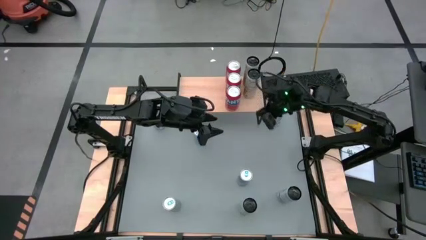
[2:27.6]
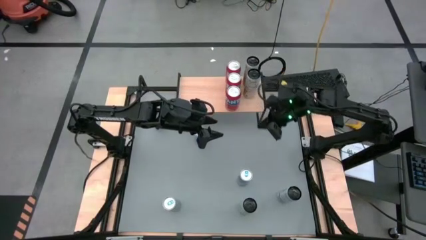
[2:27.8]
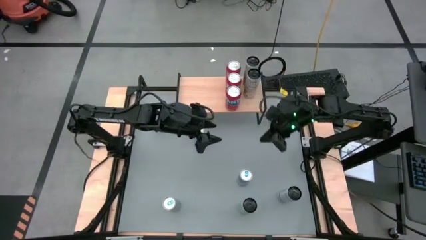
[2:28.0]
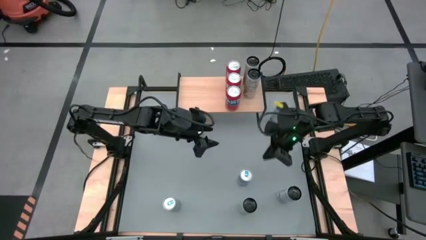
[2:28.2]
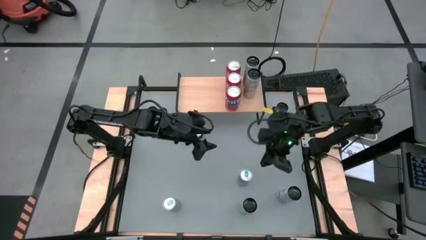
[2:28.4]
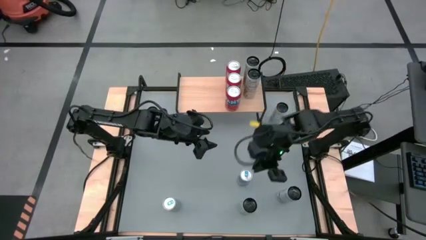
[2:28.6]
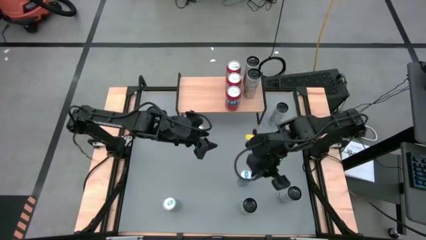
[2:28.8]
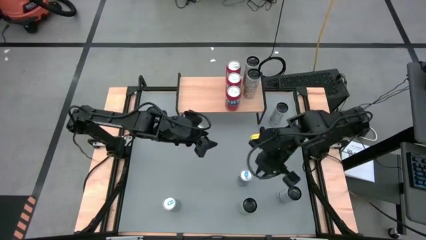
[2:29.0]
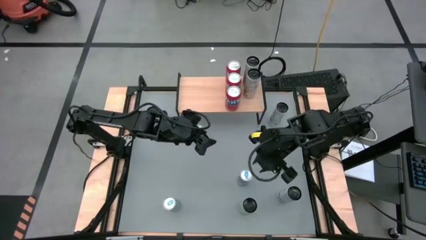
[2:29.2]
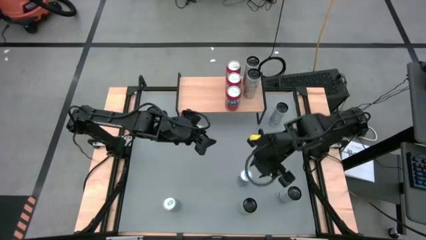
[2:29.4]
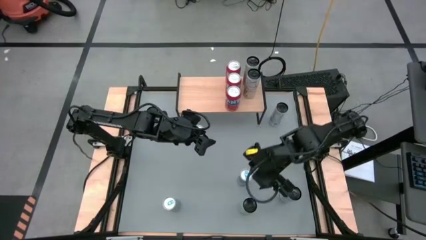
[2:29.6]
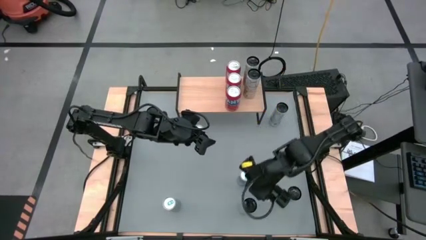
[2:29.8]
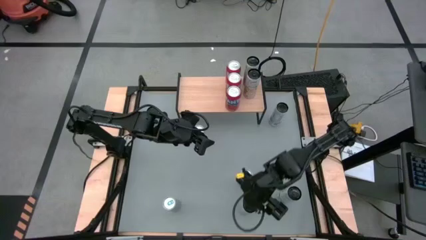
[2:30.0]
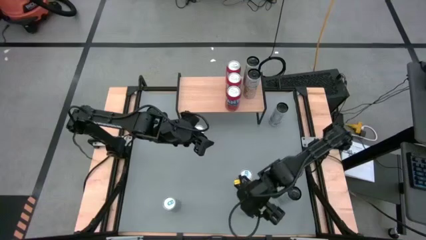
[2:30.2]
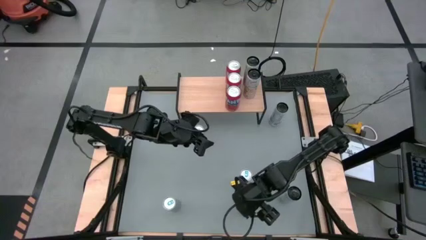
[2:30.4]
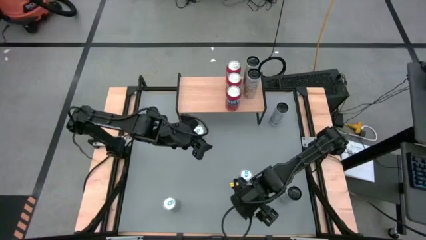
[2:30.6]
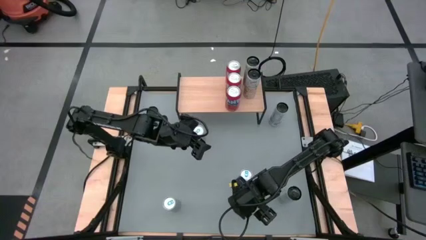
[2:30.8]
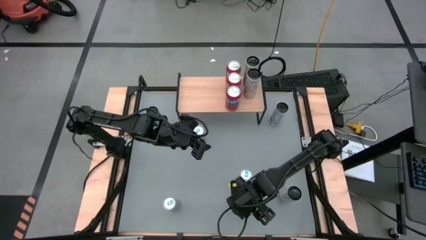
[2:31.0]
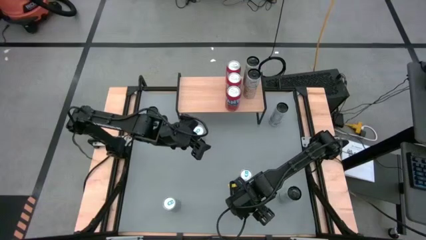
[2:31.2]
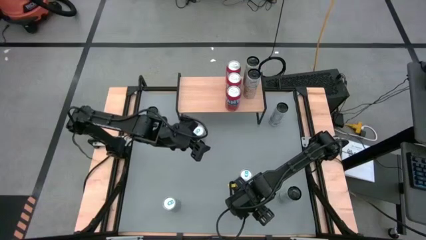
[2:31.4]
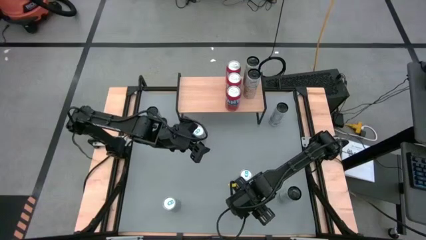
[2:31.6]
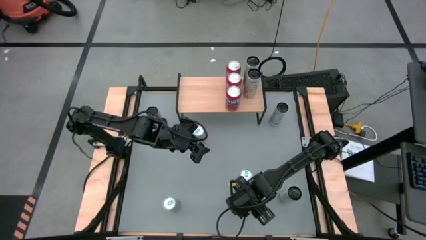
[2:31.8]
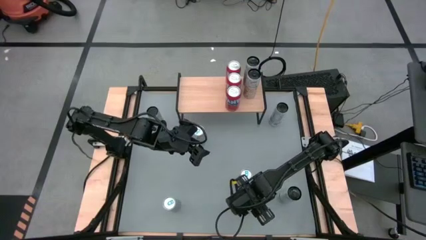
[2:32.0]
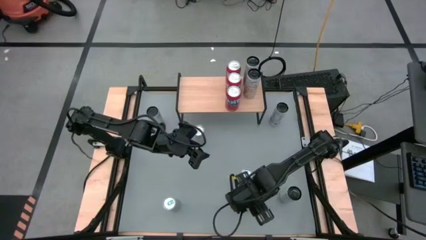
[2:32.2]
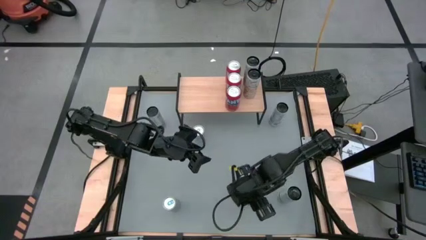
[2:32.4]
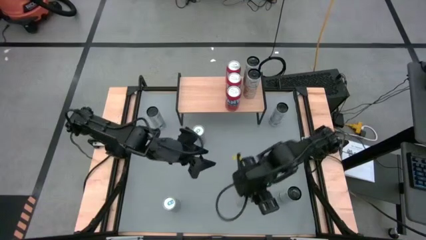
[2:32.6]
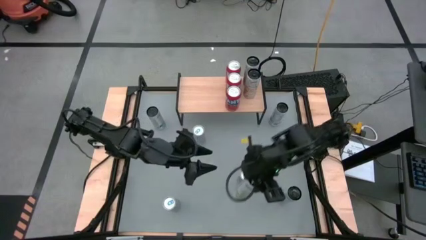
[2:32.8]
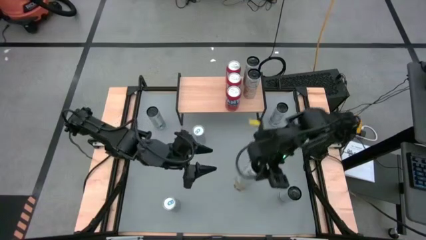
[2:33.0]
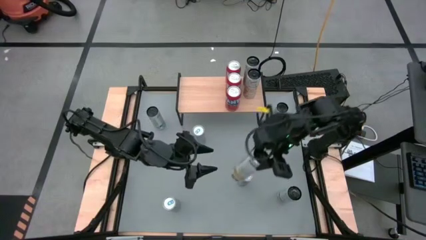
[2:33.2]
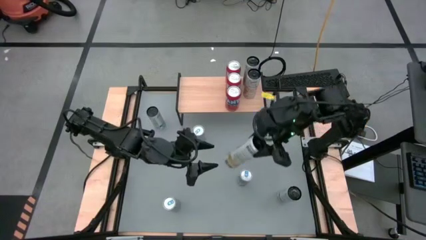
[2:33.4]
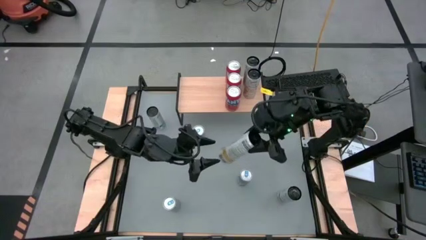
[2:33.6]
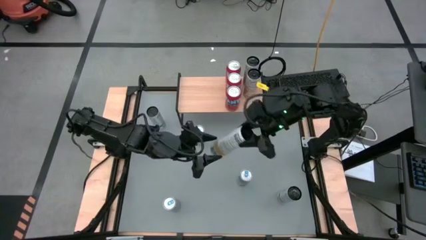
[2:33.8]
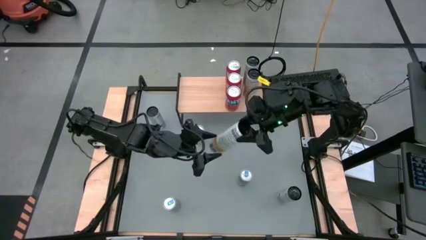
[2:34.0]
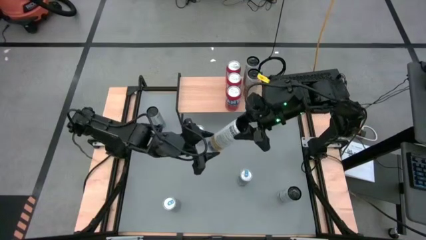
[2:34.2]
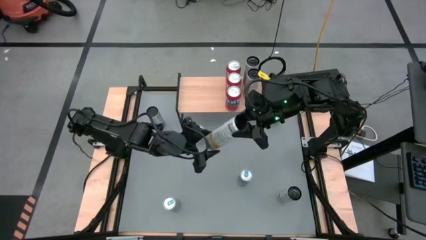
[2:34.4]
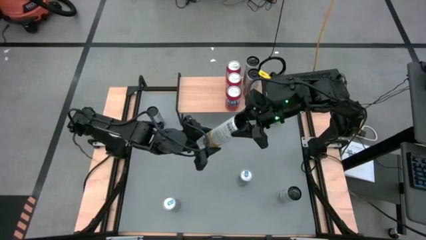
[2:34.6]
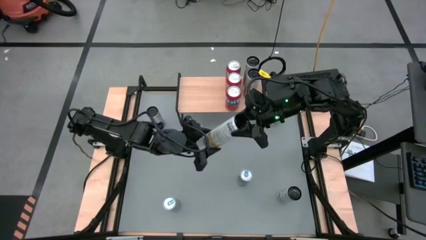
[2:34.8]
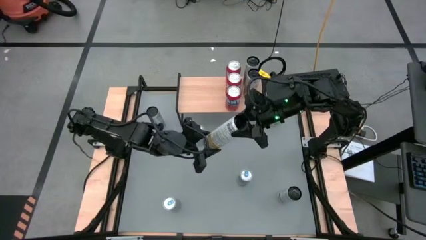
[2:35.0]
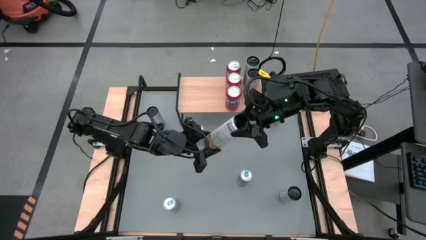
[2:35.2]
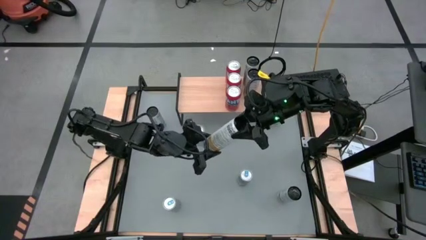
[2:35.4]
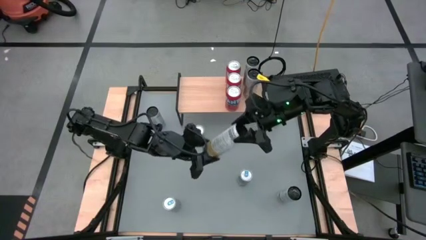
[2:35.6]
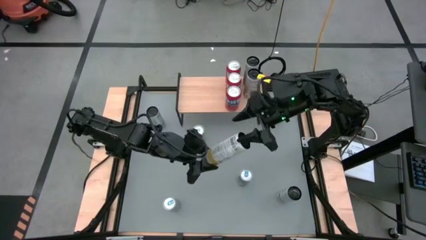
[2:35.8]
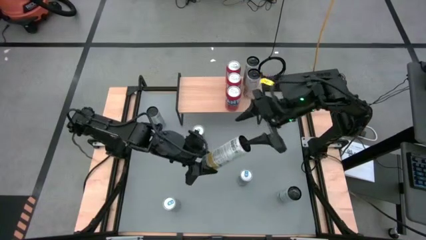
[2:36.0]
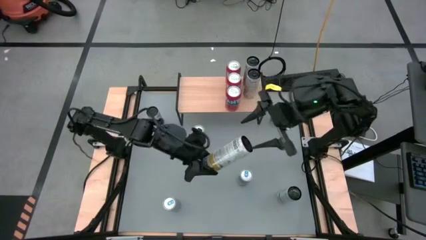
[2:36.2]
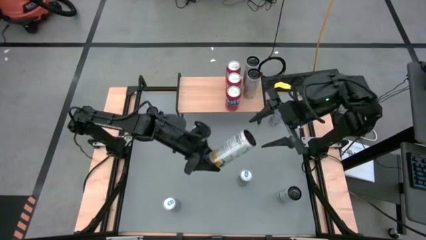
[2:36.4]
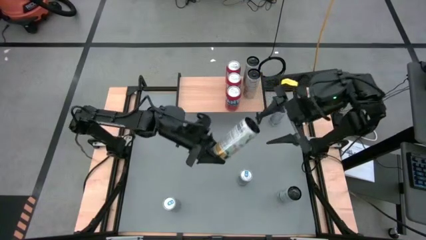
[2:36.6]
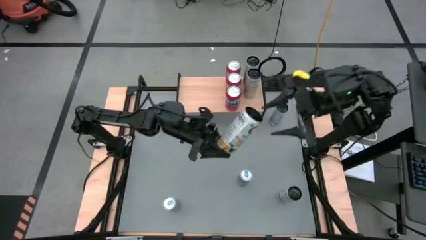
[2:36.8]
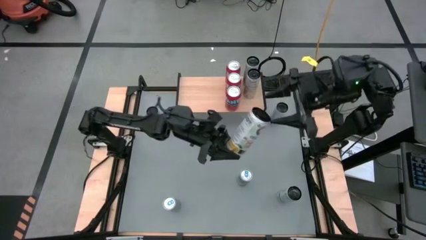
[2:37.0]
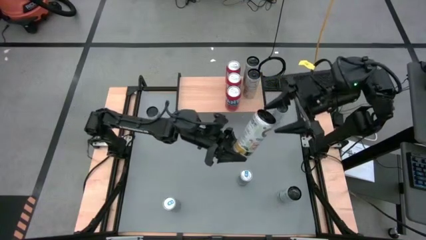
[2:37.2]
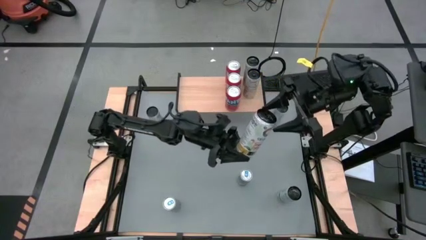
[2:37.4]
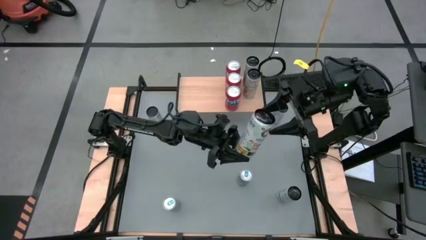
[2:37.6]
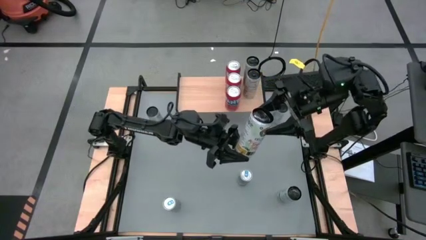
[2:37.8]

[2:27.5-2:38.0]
Task: Place canned beverage on shelf
Put the yellow soda can on the shelf aligned with the other yellow soda can

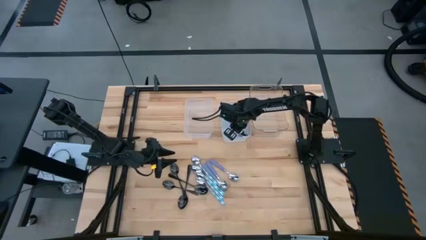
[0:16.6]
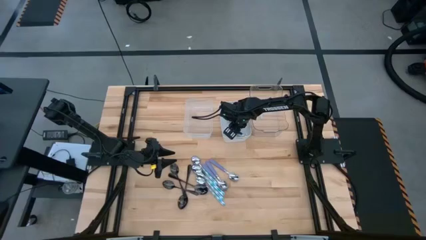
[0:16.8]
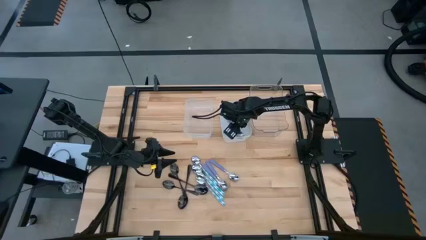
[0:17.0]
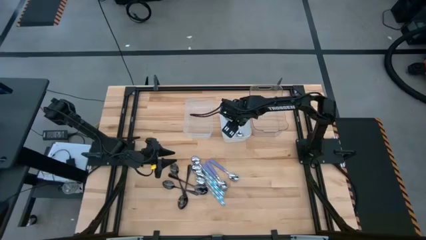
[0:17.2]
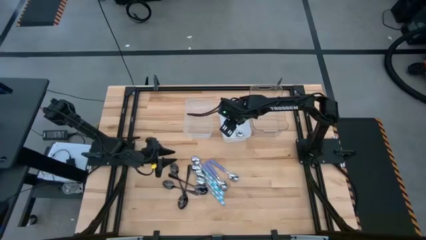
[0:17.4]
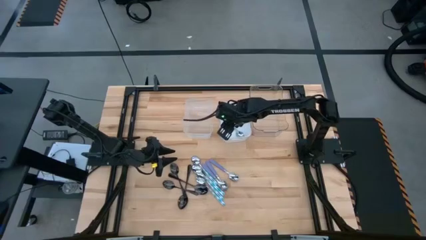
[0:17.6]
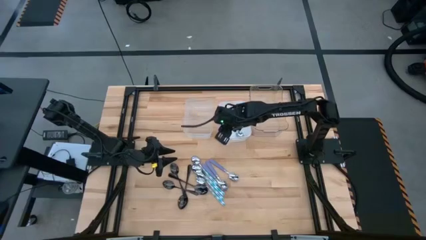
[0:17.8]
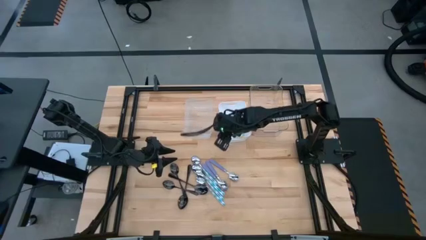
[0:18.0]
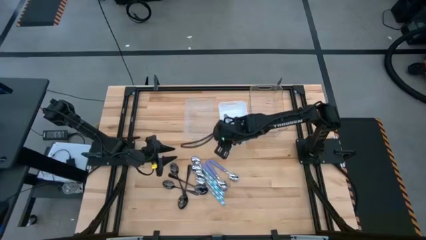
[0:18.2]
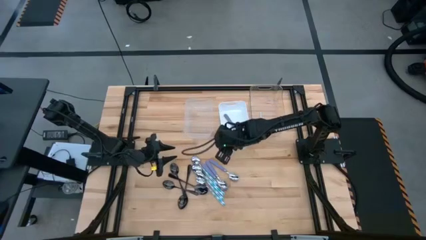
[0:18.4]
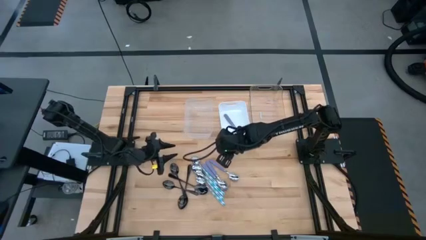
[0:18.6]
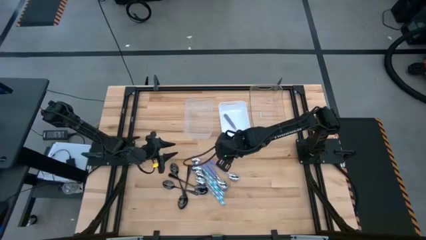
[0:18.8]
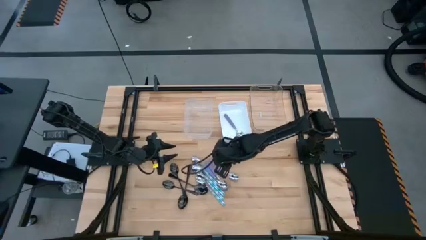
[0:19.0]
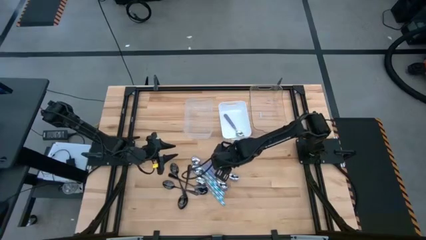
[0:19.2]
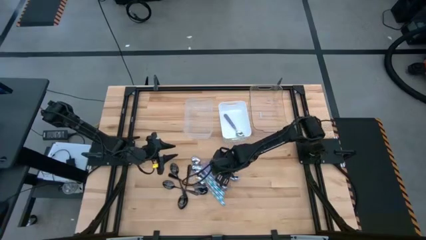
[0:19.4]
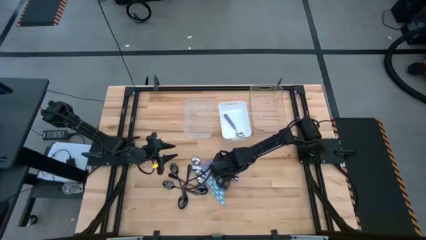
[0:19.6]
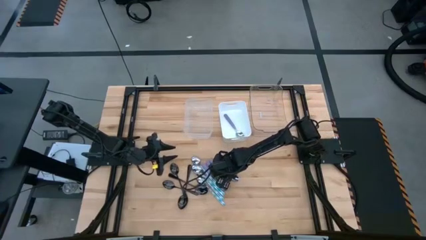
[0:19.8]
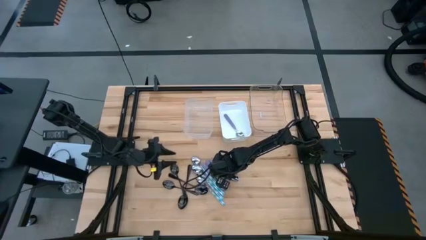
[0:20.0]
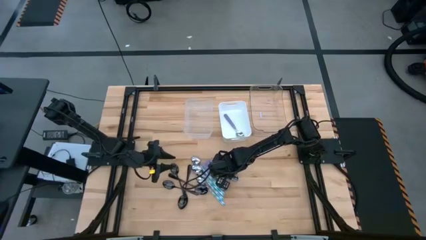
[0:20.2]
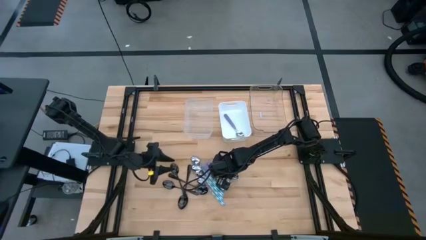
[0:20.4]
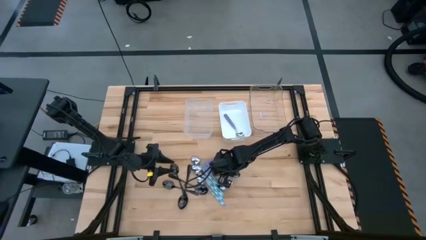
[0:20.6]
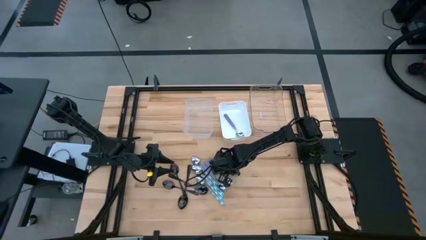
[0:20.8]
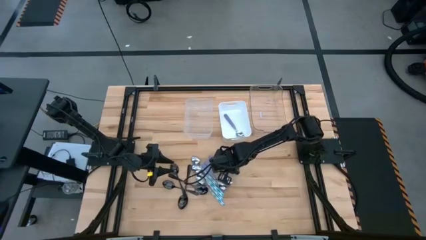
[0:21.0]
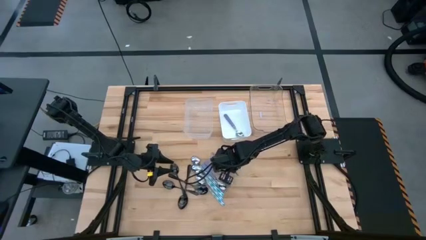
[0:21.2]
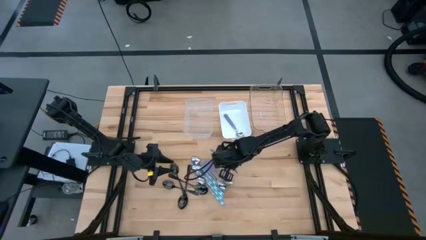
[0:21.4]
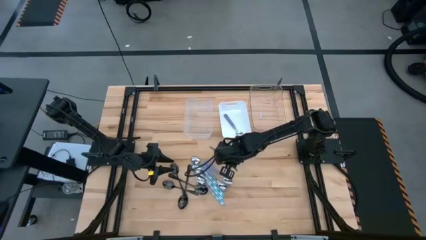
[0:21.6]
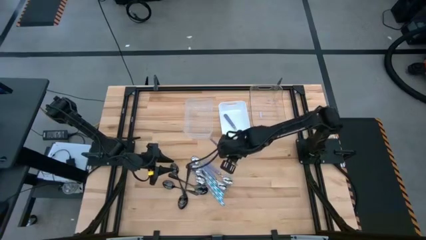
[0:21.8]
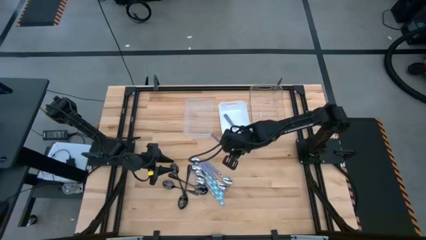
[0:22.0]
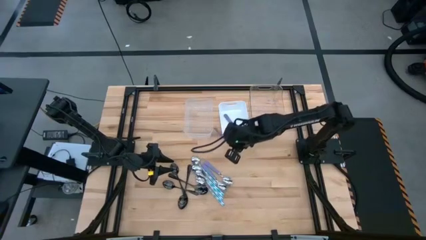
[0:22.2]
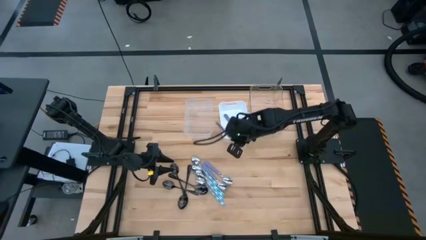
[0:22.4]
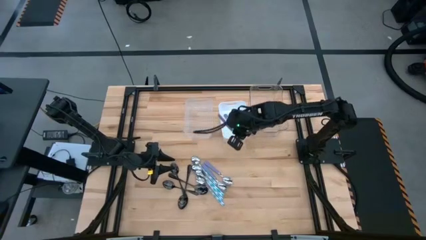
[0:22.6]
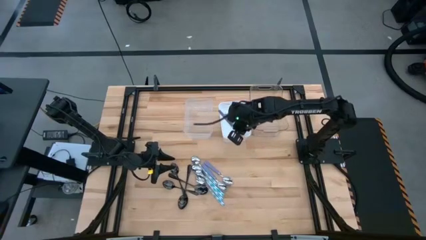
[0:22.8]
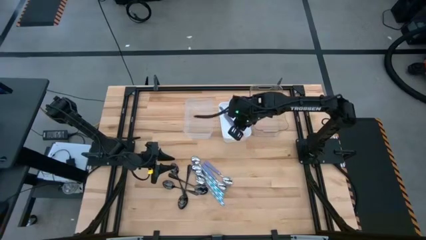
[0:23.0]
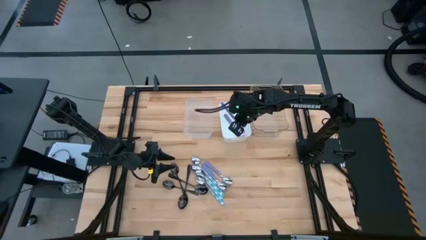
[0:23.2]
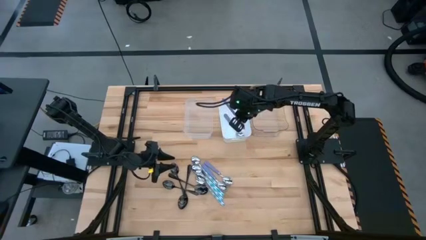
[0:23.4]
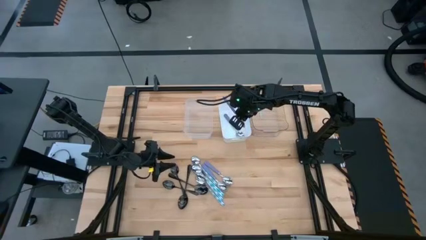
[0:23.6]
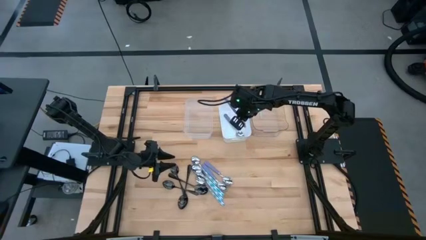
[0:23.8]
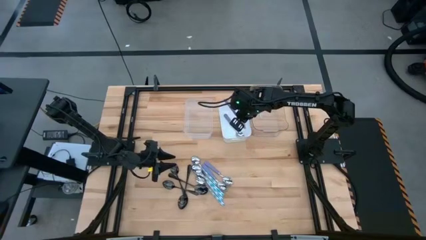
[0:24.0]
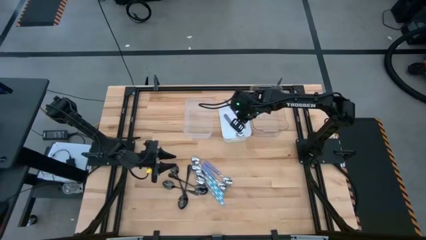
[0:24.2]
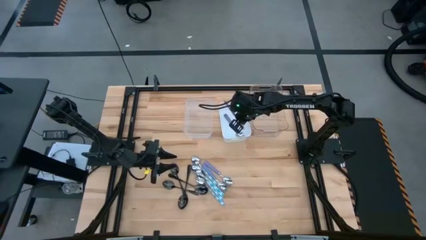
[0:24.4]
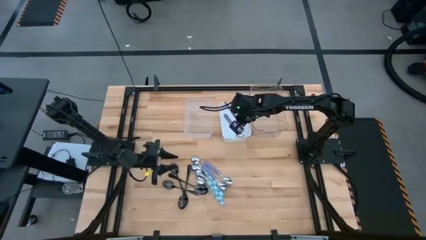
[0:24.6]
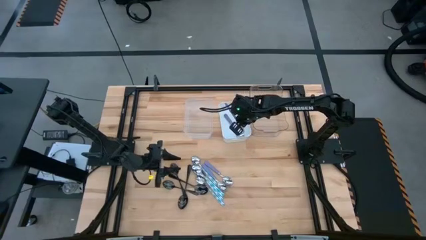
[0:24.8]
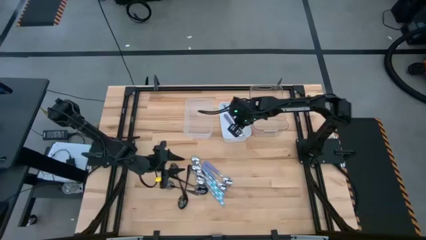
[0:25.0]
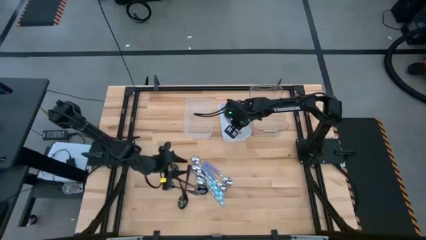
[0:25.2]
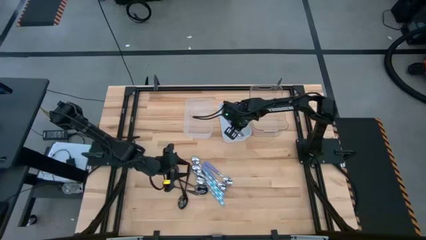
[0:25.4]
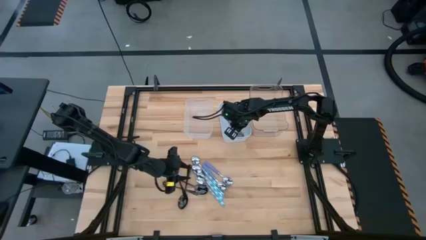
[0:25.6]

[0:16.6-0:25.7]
Task: Sort silverware by color (type)
Put the violet spoon into the white bin
